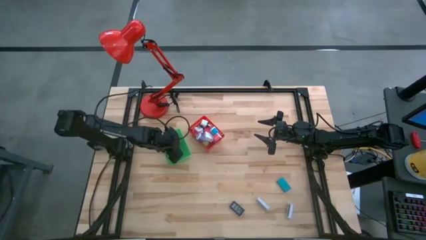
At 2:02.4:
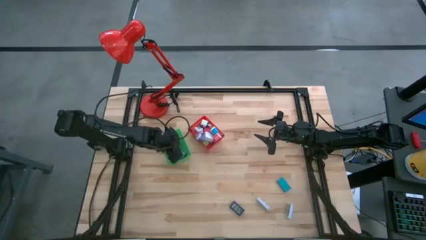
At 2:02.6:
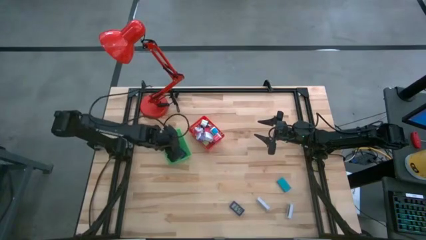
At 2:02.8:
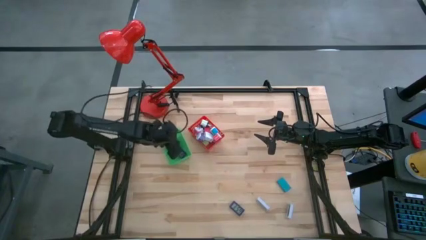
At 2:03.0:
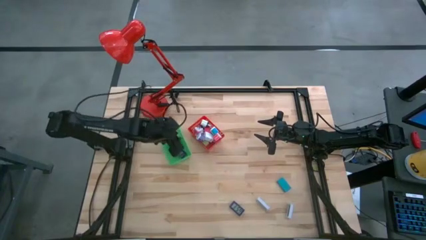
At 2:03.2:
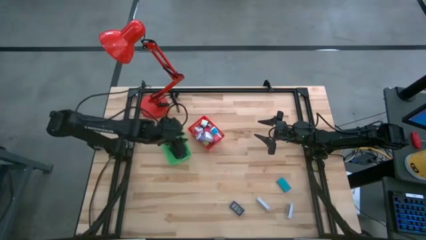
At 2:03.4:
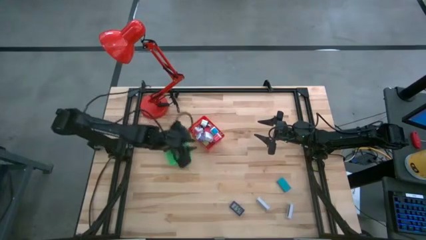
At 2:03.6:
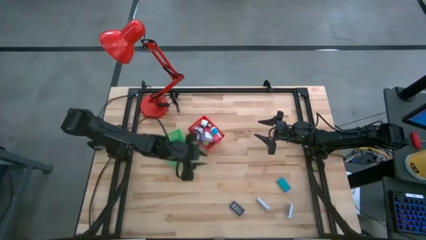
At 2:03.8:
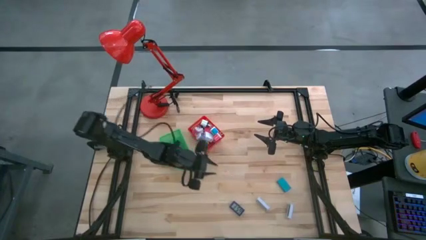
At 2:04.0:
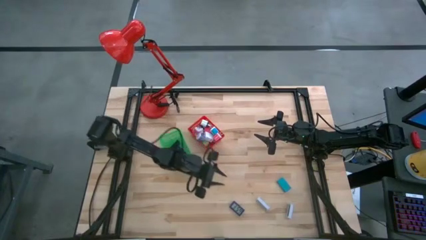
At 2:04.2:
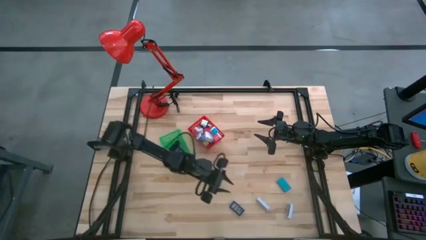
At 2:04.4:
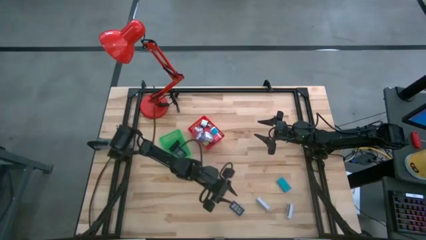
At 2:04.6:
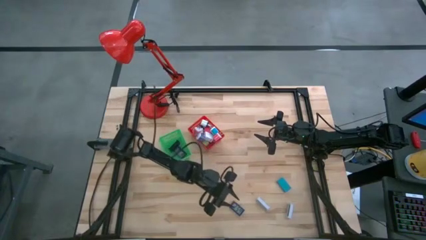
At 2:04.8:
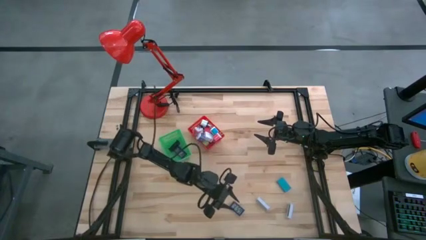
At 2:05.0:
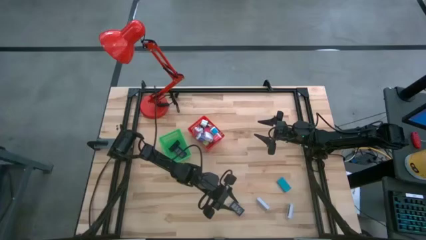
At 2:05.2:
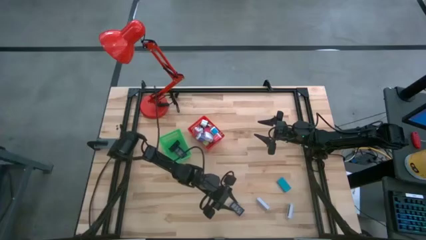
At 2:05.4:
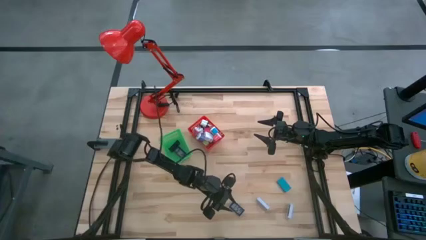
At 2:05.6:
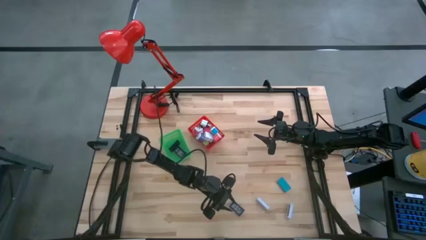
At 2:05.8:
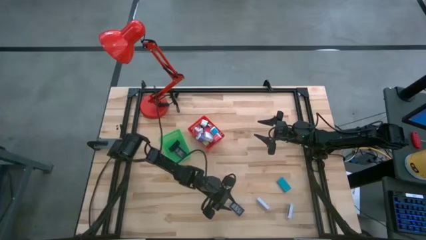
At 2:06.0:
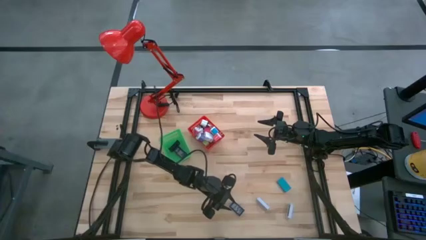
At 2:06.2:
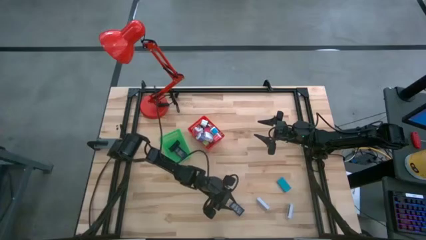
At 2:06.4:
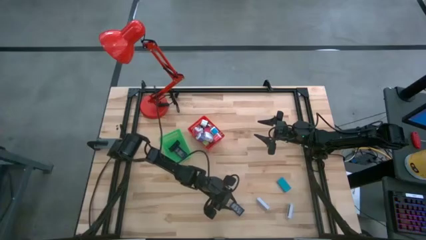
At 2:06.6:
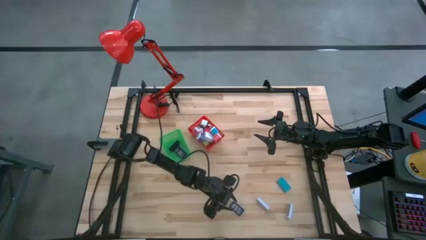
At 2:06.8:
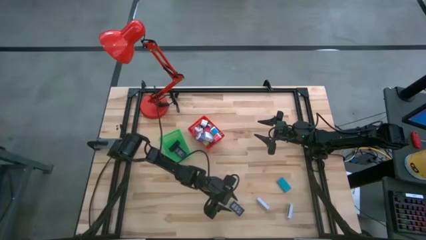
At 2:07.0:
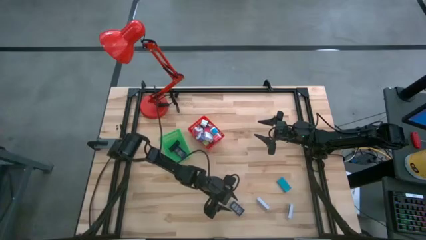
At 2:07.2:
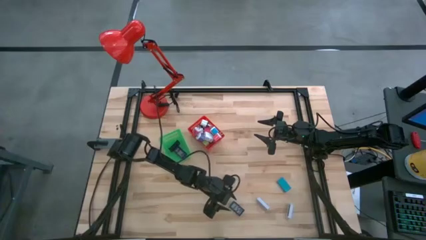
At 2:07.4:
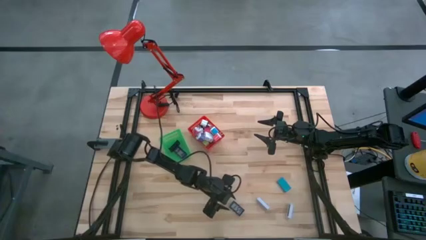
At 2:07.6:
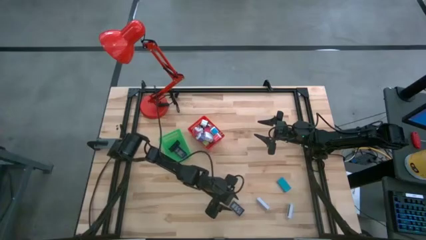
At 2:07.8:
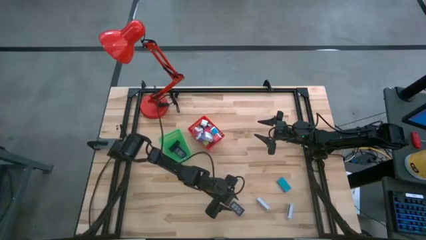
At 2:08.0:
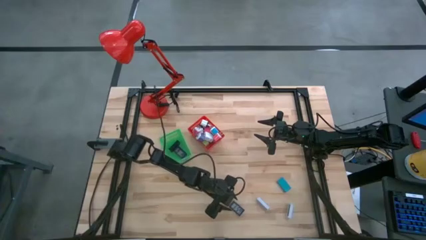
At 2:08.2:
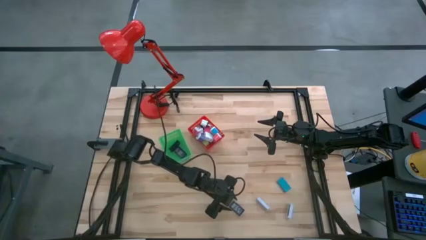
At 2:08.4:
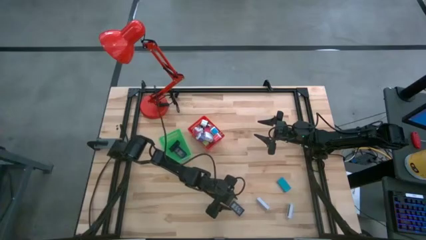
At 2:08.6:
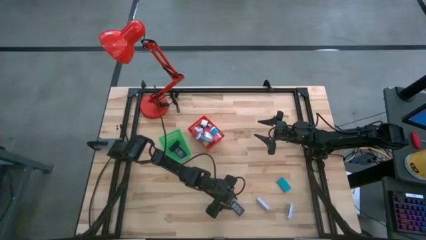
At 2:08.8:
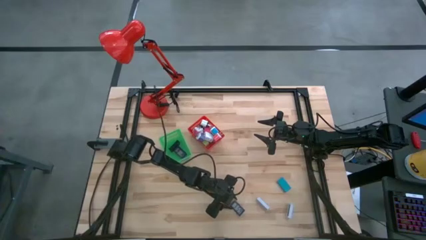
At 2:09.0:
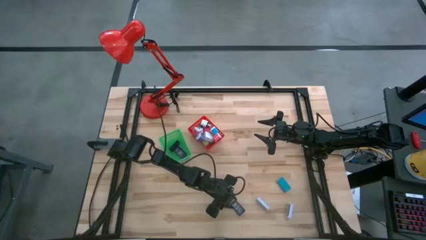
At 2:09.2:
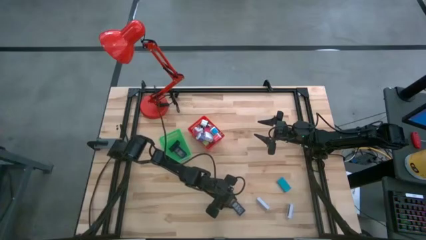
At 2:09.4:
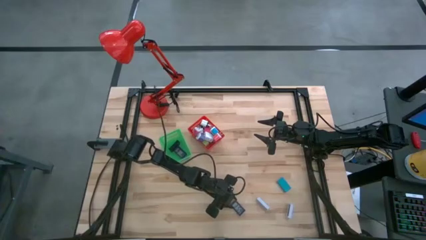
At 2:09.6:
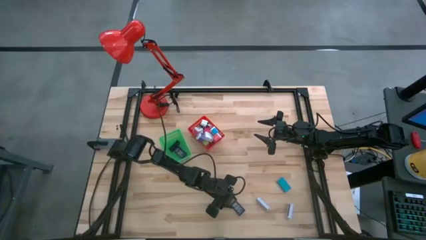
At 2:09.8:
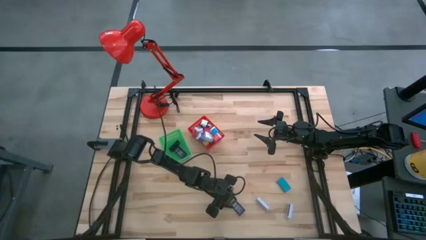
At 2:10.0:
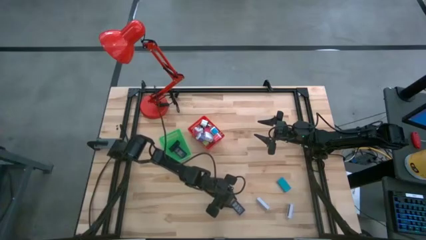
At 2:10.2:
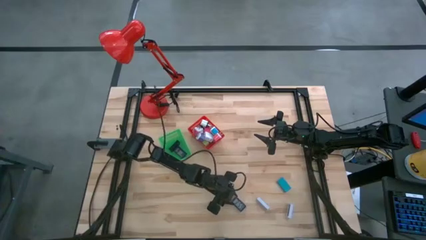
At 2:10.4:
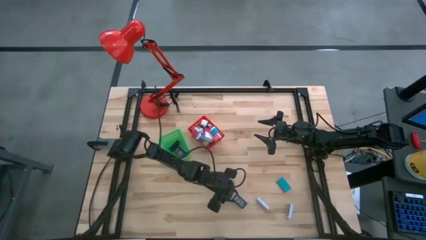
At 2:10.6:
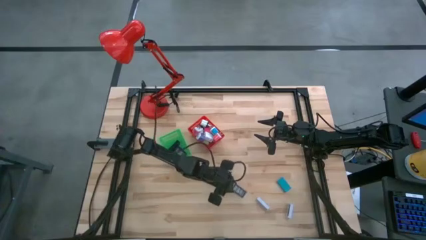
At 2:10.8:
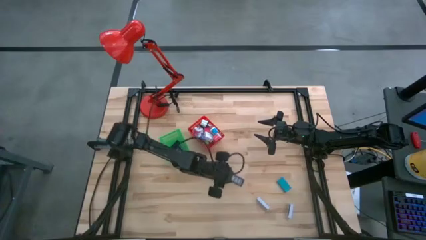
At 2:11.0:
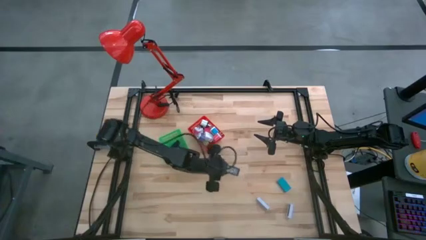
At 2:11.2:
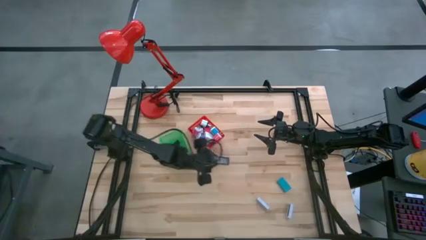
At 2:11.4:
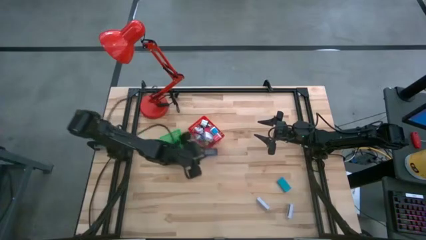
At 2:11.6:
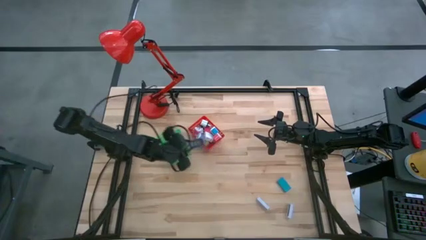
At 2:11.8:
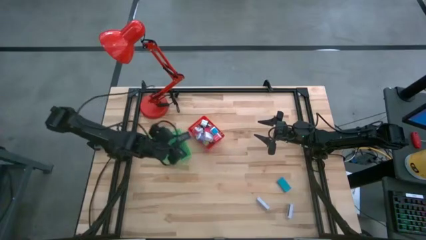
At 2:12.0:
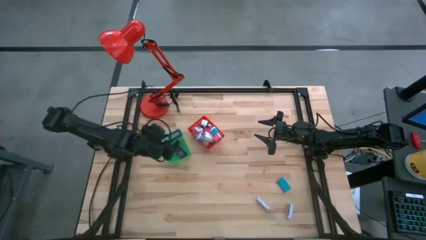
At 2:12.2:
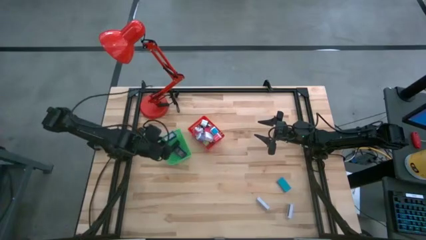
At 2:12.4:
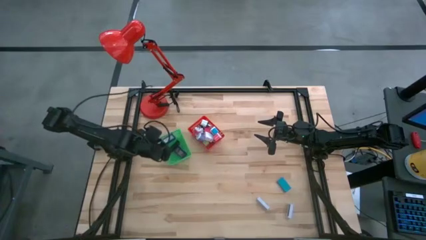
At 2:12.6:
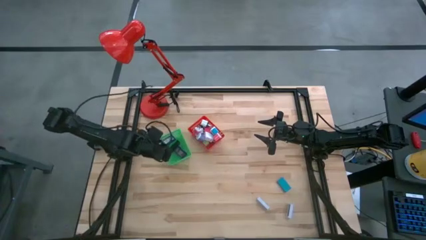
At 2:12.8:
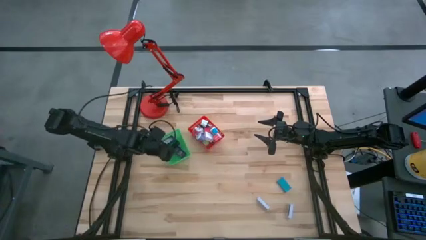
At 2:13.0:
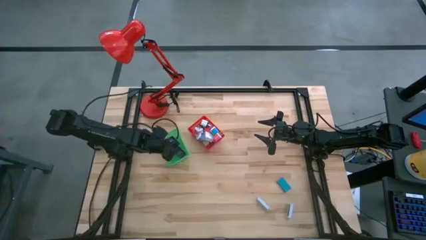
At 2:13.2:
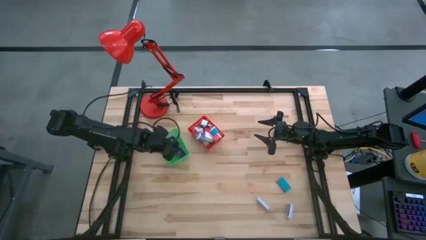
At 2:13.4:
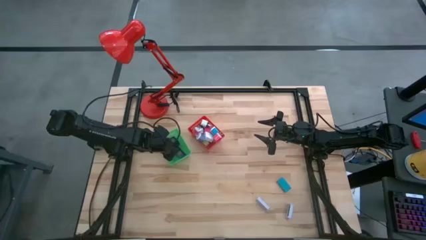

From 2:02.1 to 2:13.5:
Task: Pick & Place Office items
Put the blue timer into the green bin

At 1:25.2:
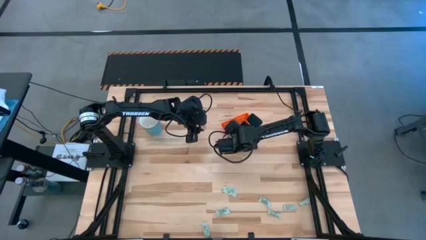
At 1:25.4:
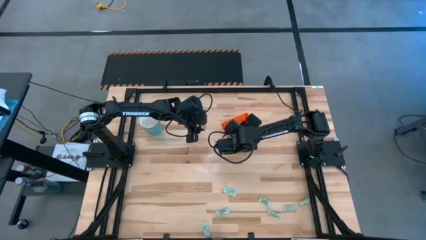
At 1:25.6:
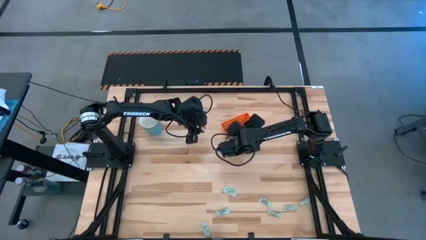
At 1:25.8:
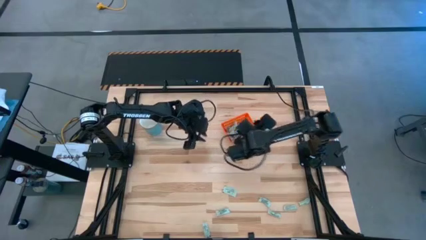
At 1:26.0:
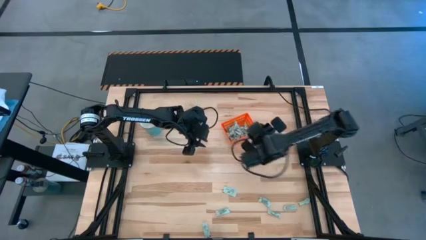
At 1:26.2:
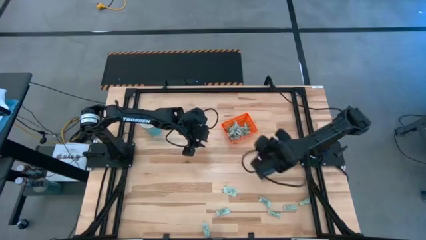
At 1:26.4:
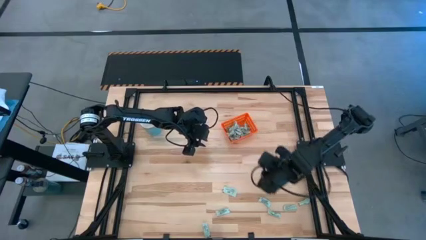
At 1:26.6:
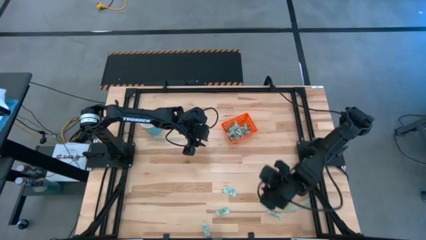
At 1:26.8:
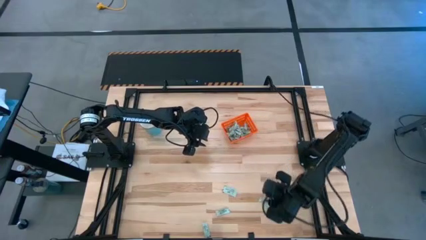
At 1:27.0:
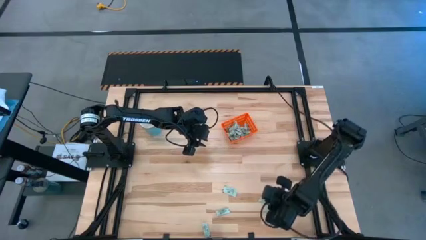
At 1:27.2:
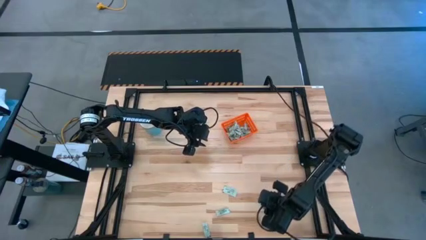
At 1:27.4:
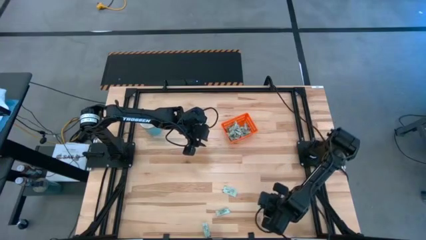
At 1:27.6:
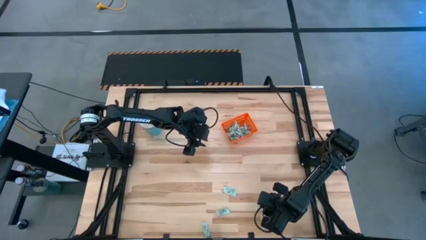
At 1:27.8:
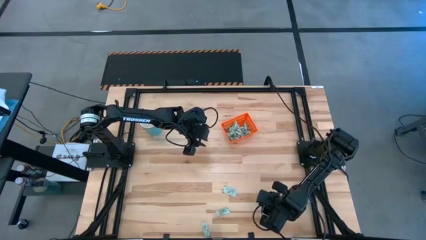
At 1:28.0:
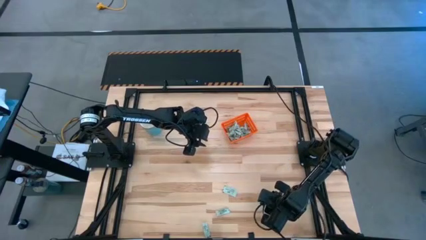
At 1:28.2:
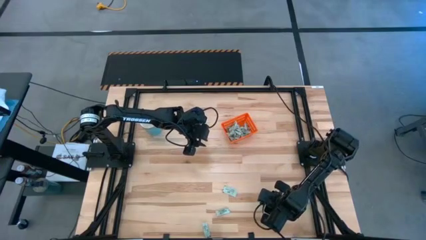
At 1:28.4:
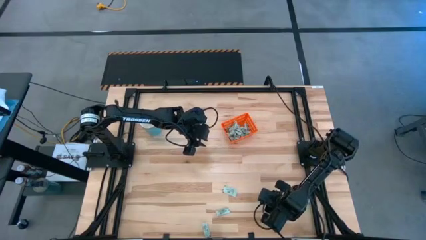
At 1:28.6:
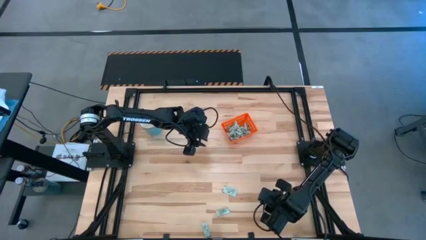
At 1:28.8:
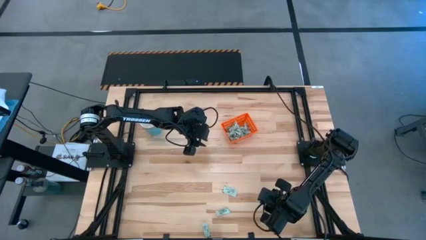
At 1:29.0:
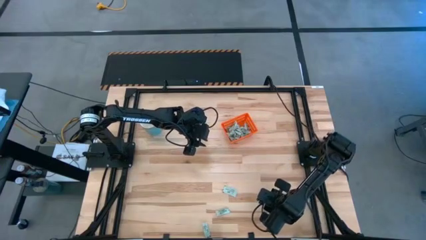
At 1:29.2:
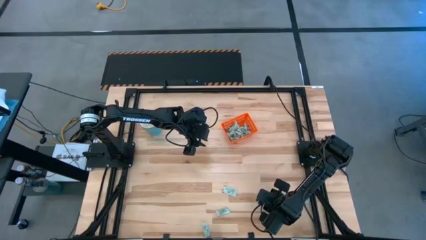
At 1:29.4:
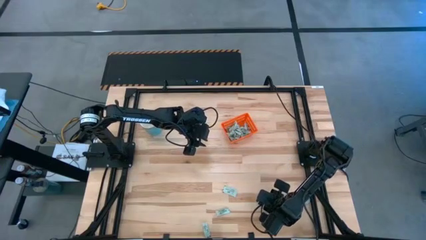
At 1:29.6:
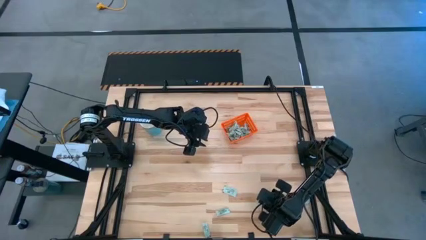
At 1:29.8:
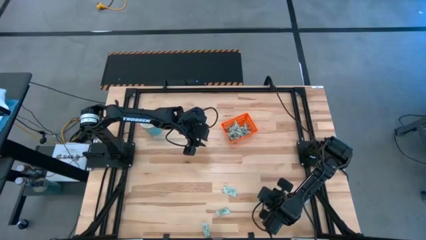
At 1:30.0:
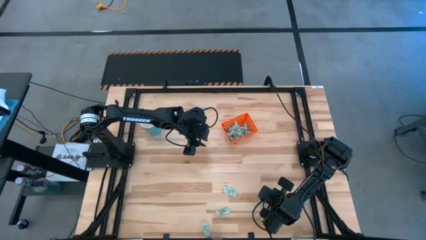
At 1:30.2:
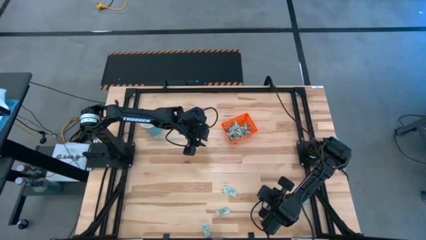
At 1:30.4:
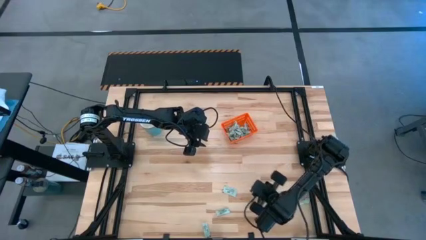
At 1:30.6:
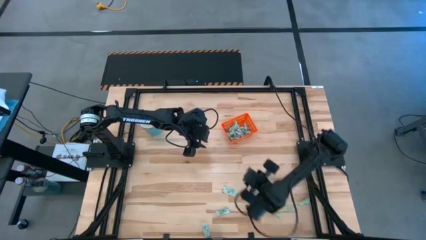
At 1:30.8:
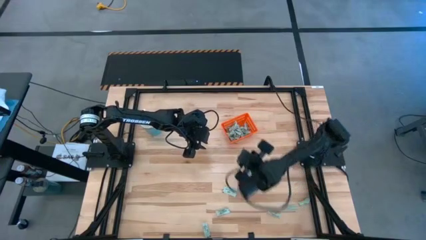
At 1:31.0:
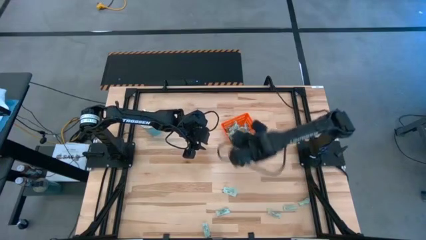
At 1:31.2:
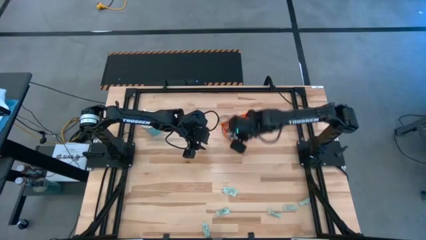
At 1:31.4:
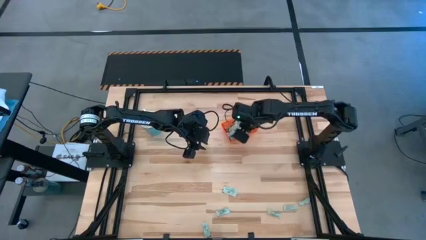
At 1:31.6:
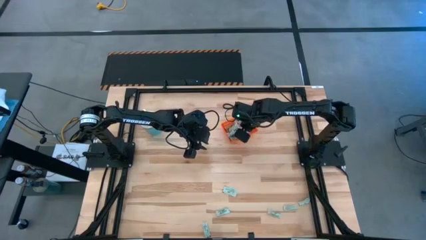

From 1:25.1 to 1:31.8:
Task: Pick and place Stevia / Truvia into bins
Put the stevia packet into the orange bin
